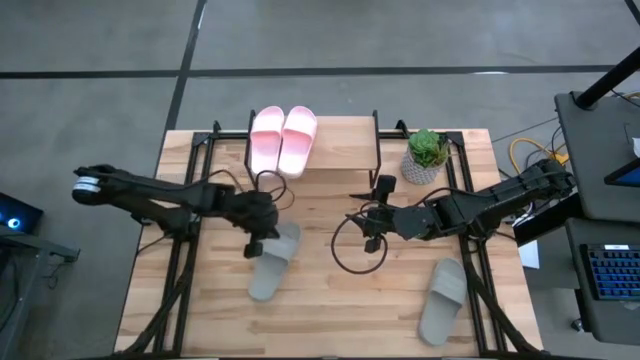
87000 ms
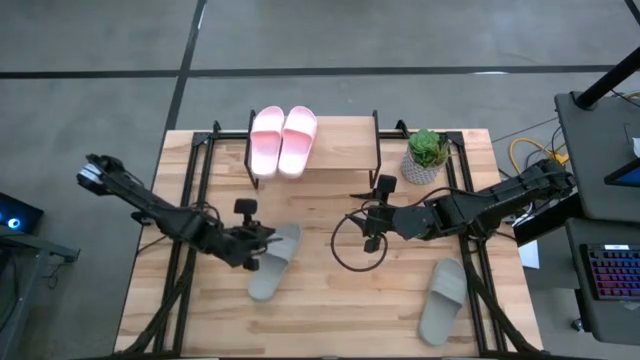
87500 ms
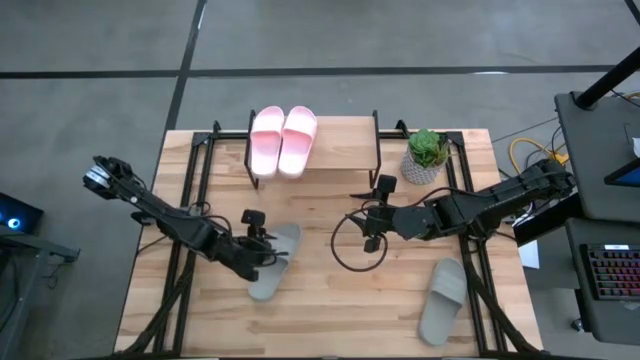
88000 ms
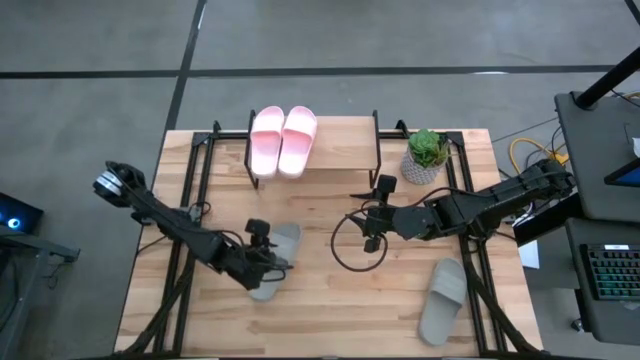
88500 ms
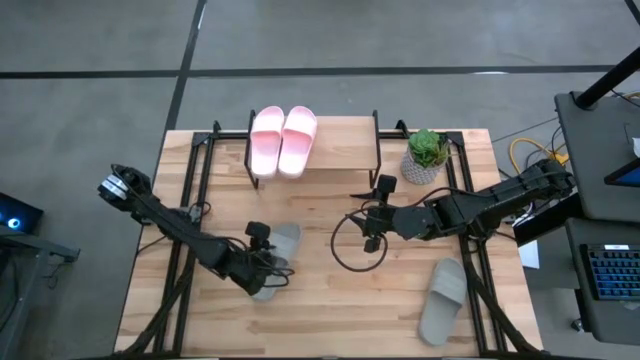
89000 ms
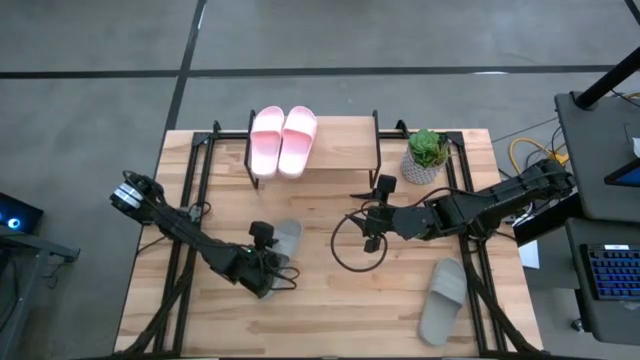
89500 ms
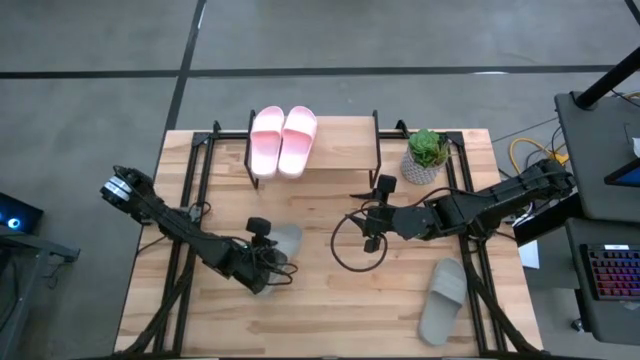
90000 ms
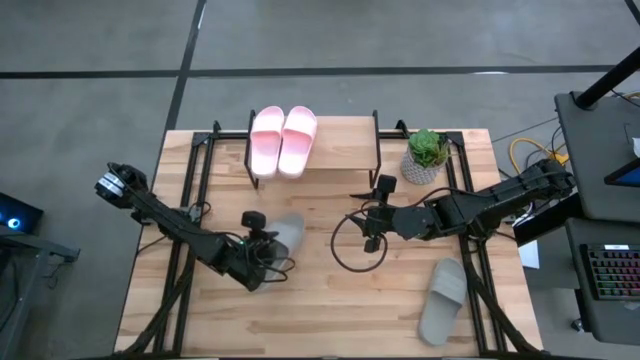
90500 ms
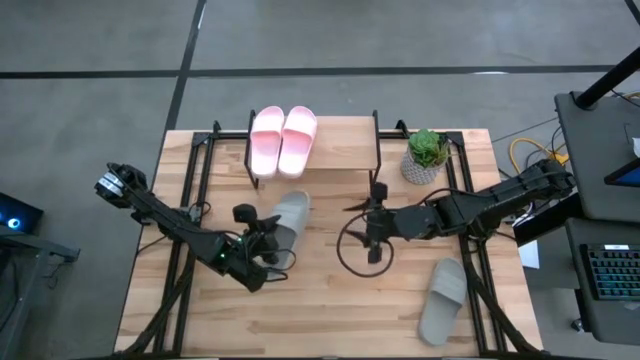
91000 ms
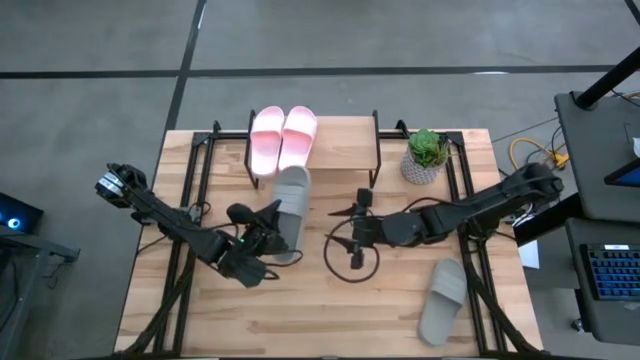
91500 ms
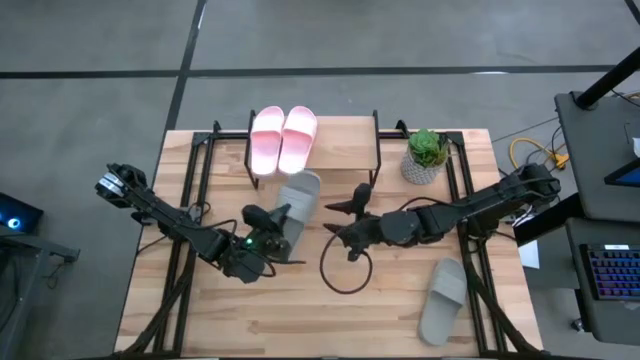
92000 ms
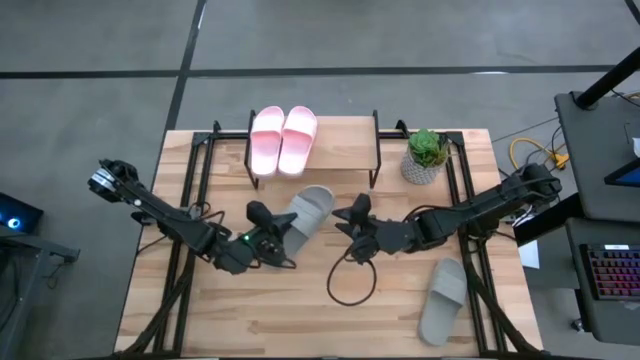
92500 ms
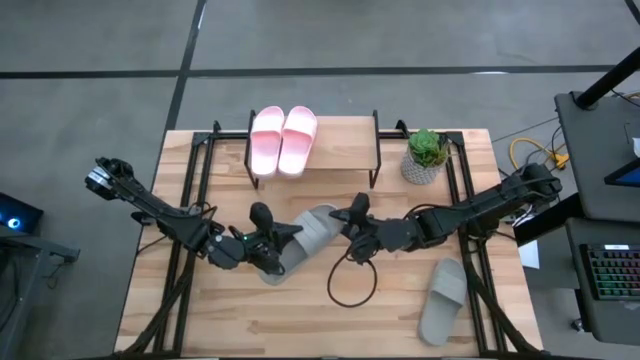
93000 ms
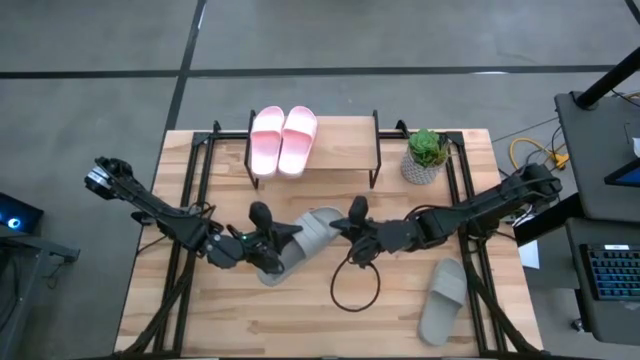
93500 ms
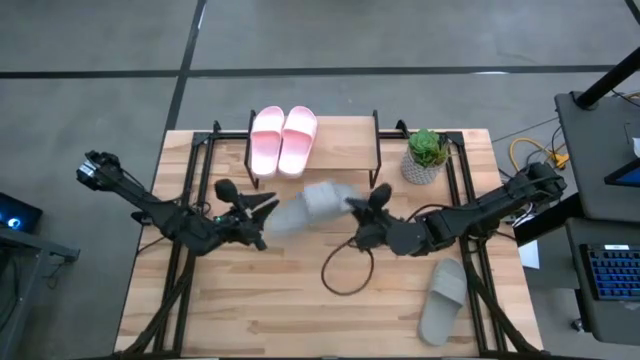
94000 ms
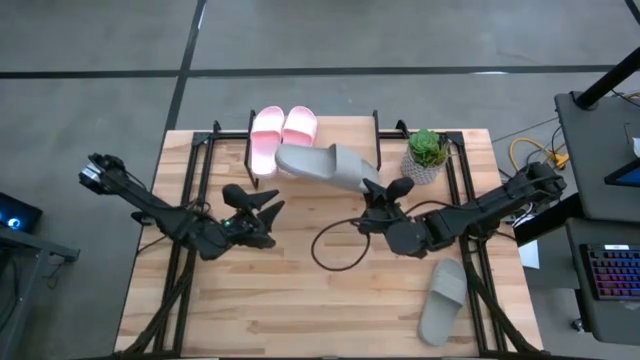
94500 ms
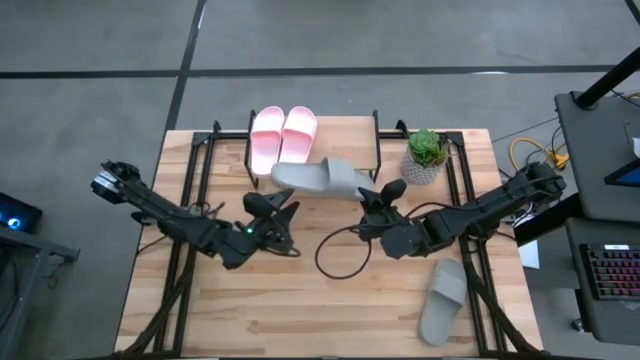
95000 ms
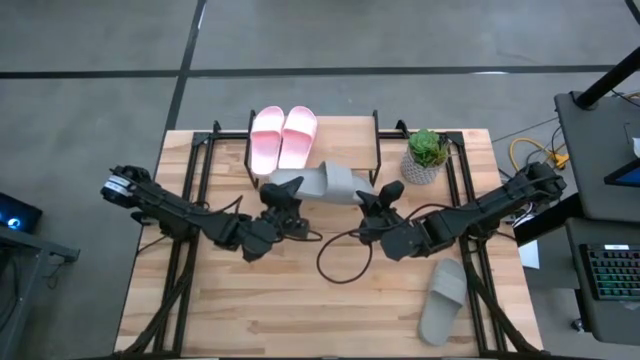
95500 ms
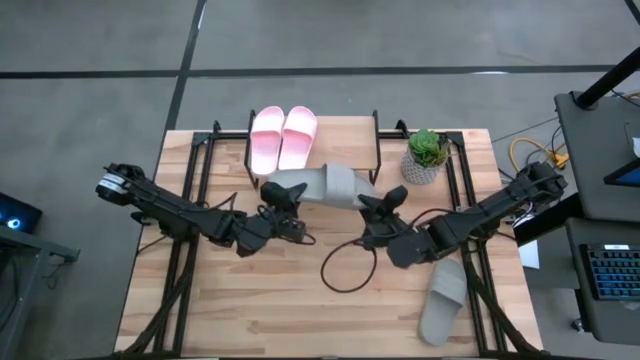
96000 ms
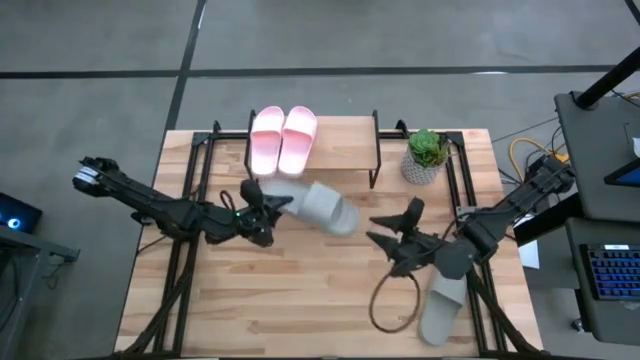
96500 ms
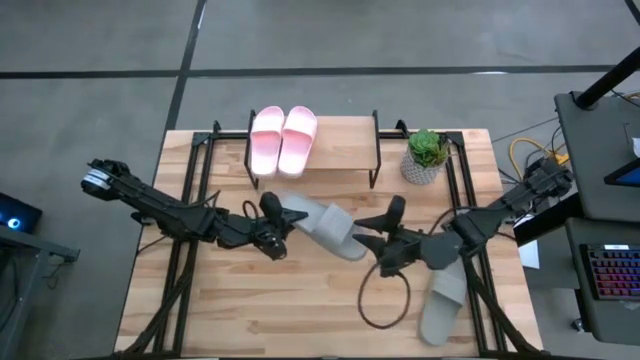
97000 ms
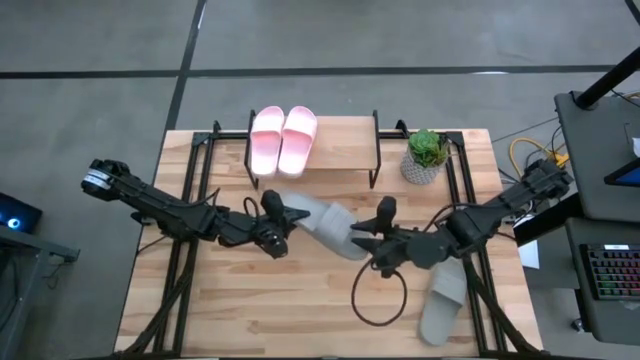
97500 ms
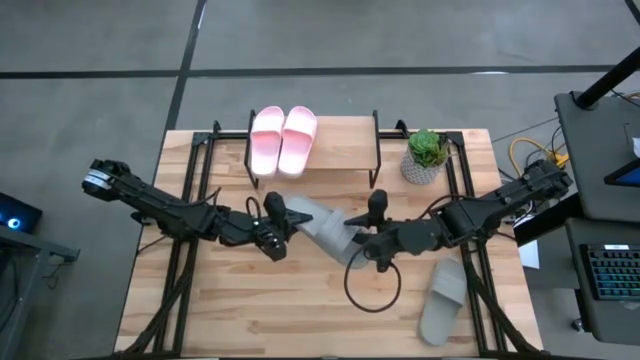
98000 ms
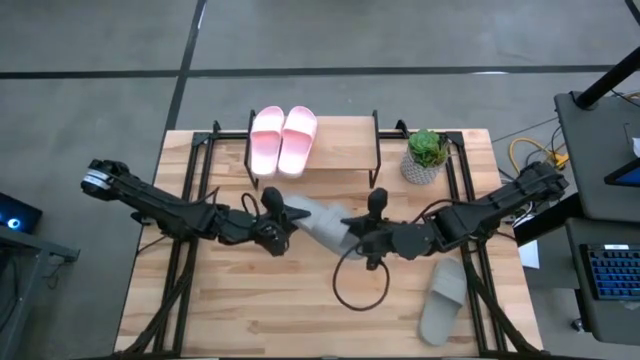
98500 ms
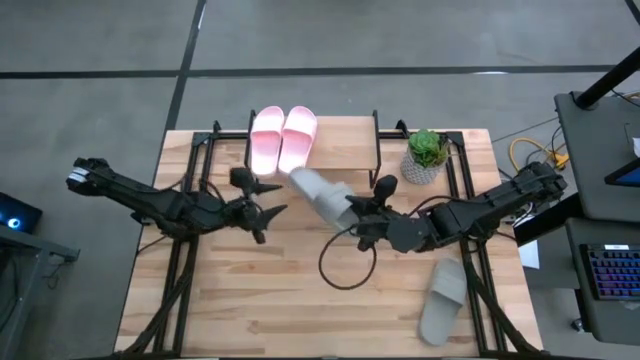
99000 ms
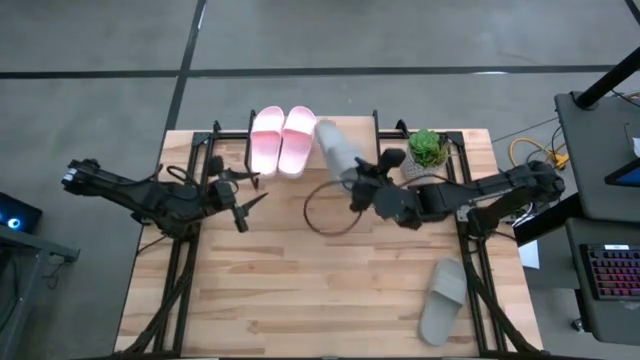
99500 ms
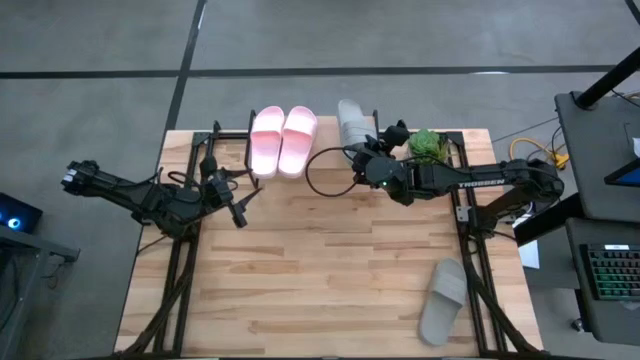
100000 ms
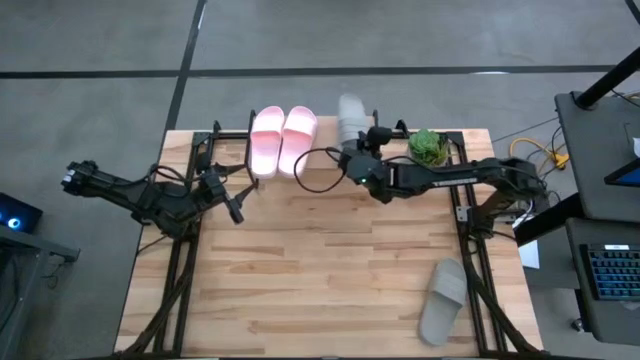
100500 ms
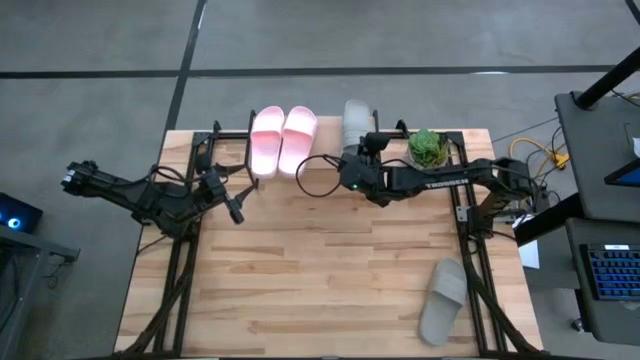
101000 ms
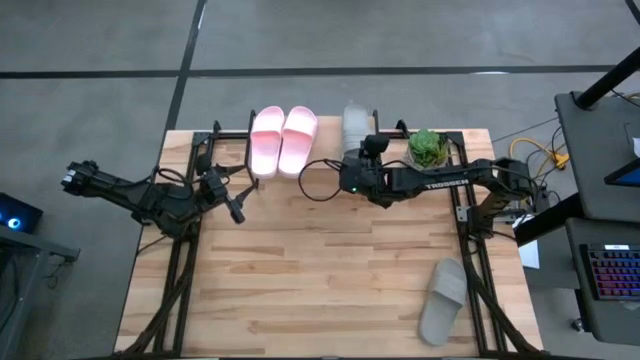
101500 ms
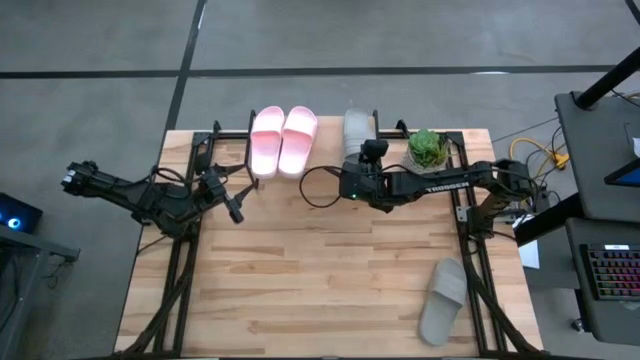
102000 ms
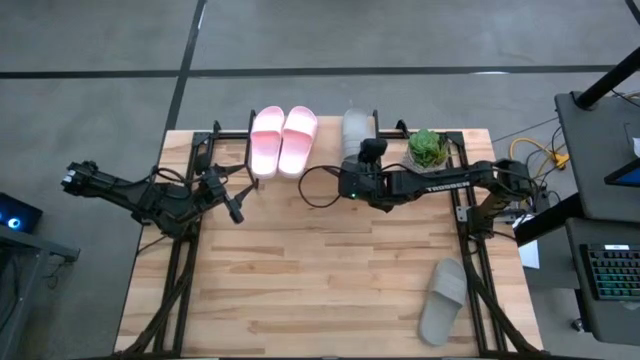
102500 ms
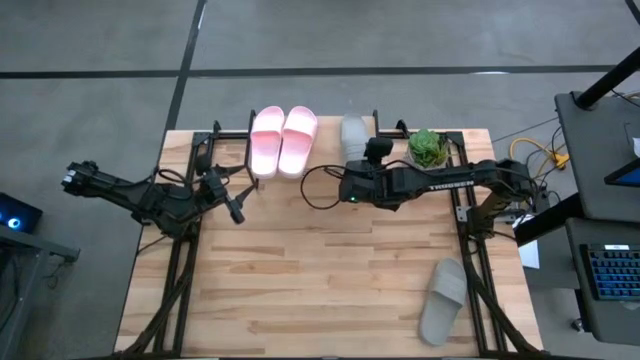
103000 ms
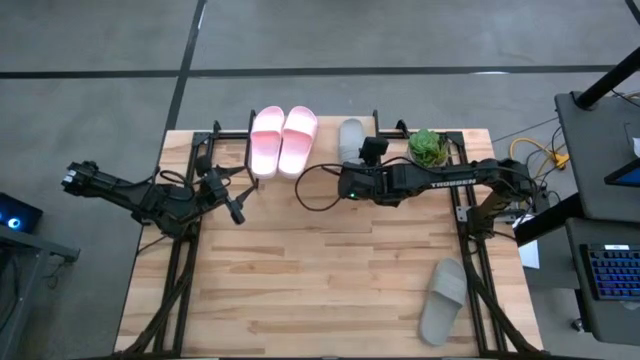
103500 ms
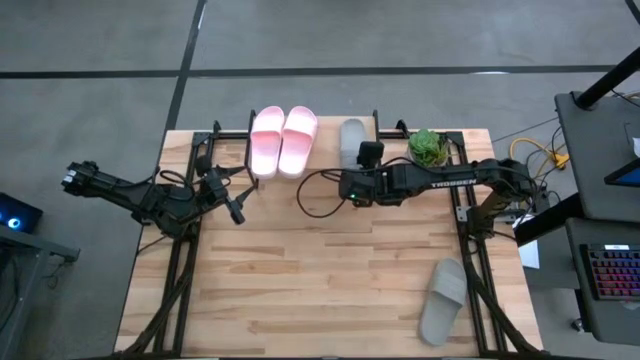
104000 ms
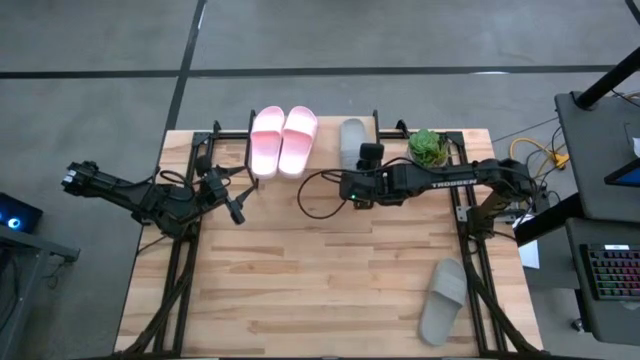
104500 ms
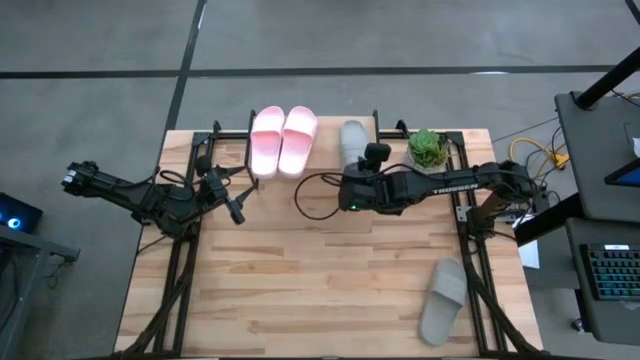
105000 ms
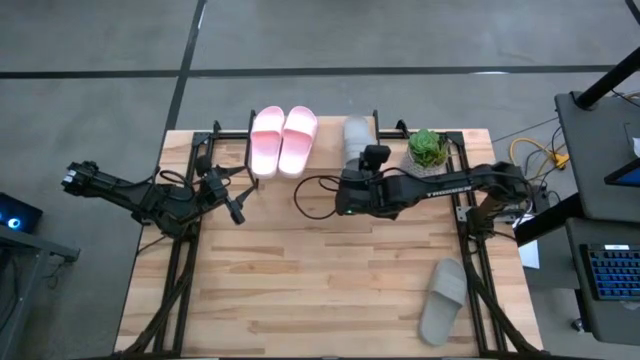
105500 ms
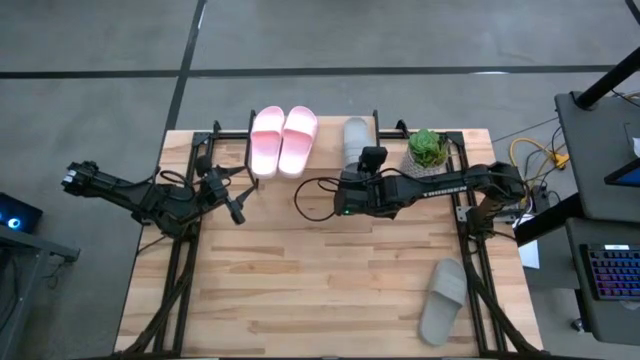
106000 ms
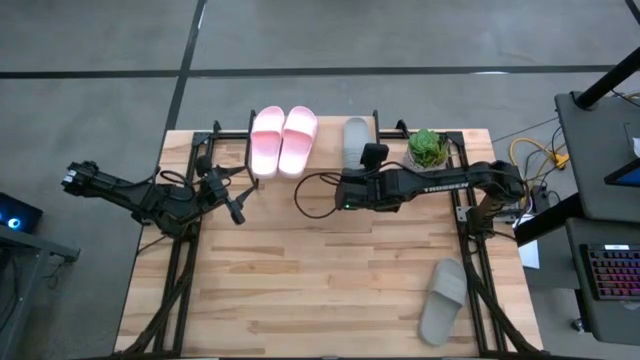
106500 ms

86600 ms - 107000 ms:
Task: Pick and place slides into the shelf
Put the left gray slipper on the shelf

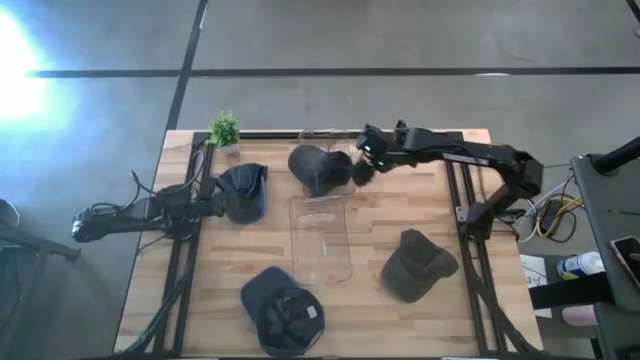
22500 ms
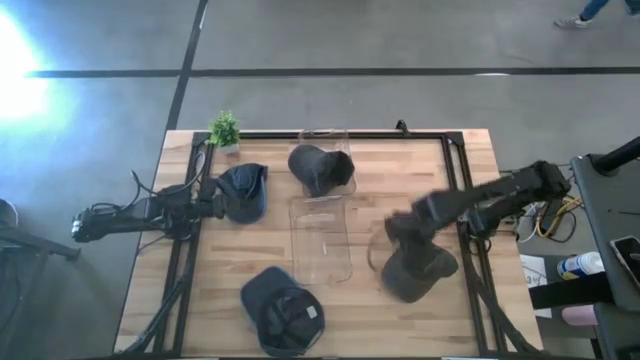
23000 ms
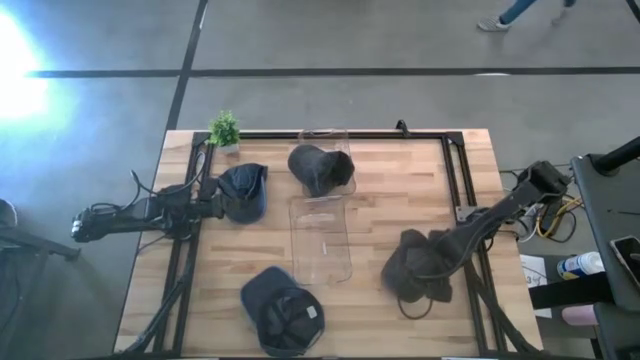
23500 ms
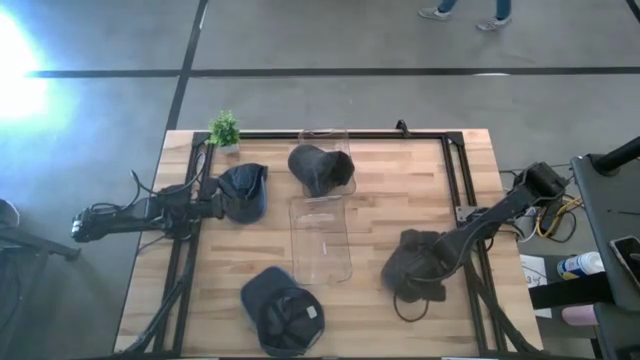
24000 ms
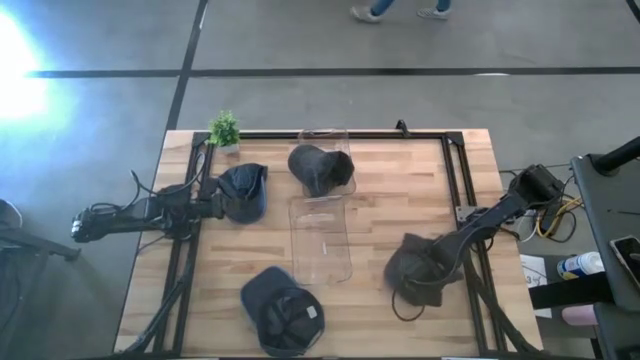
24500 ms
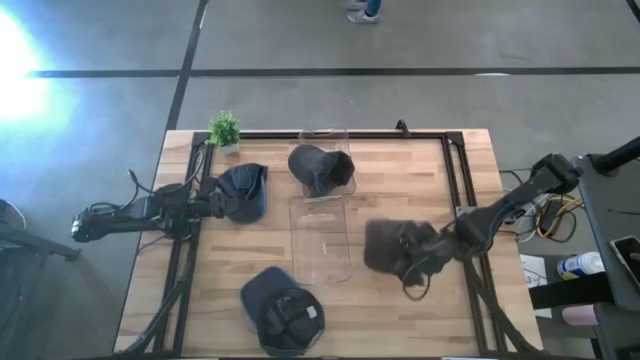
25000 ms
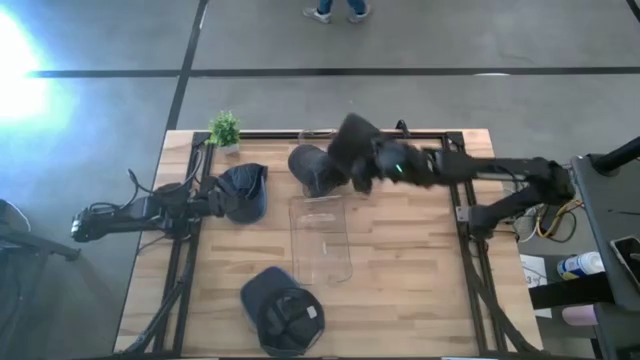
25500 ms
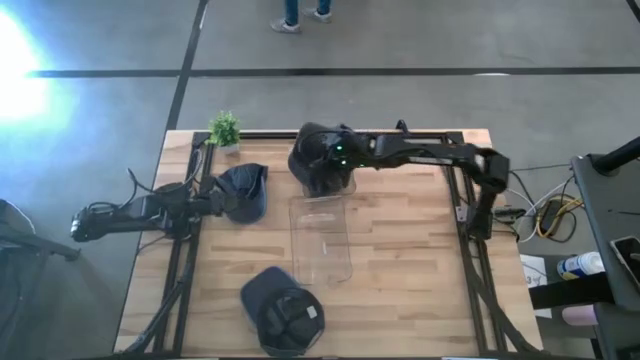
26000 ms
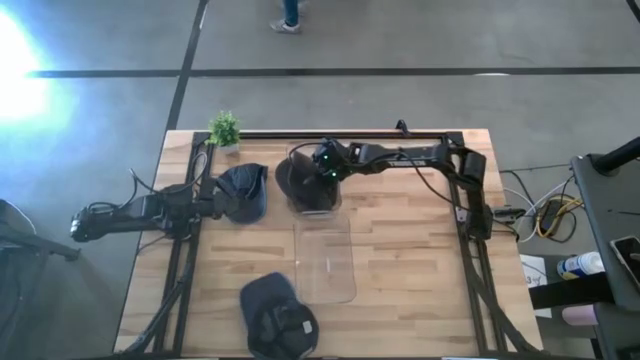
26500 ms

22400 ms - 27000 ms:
Task: Pick & Place hat
Put the black cap into the top transparent bin
